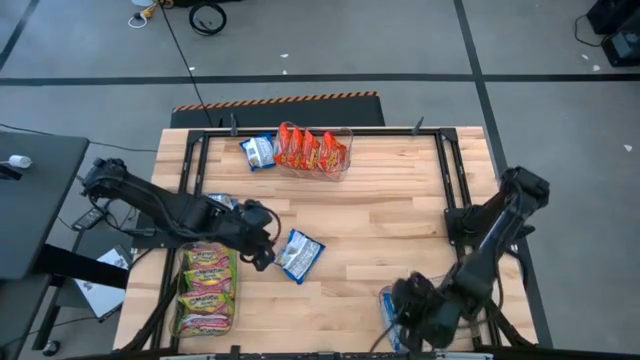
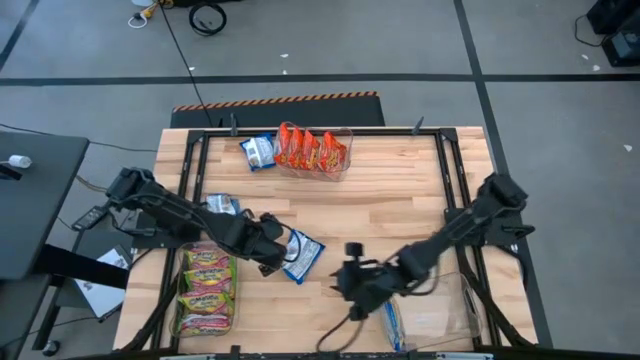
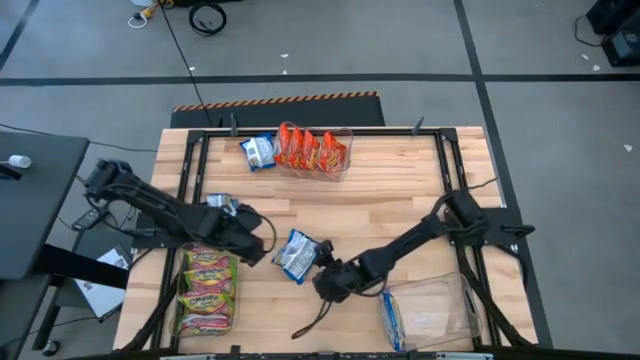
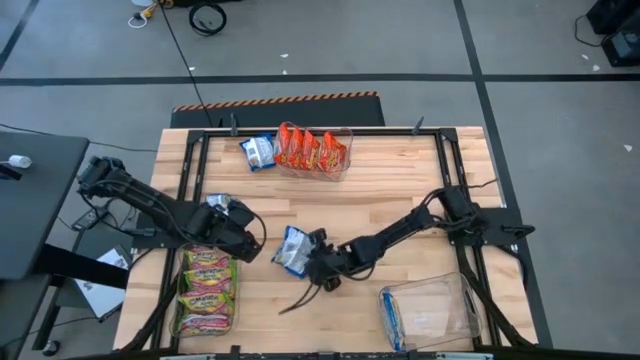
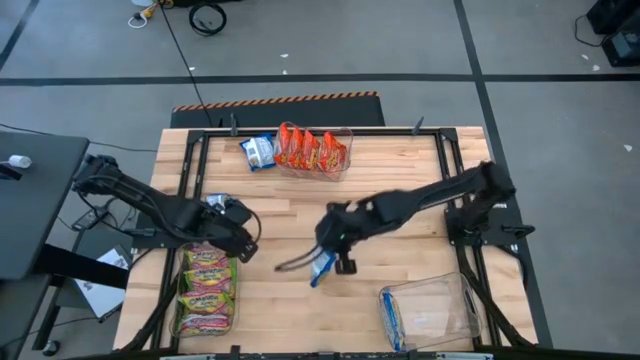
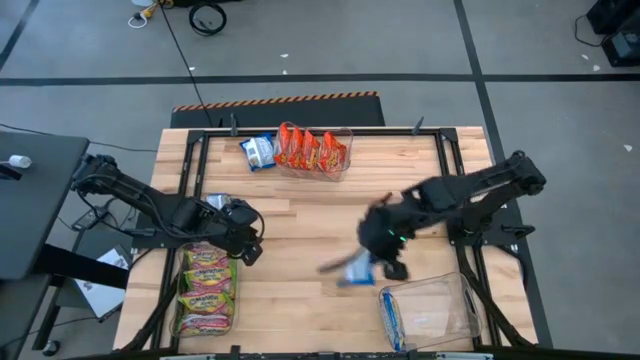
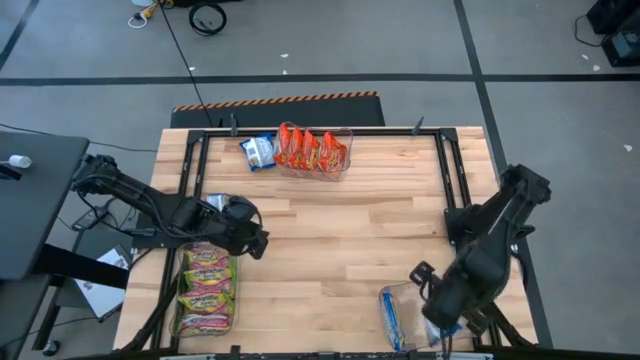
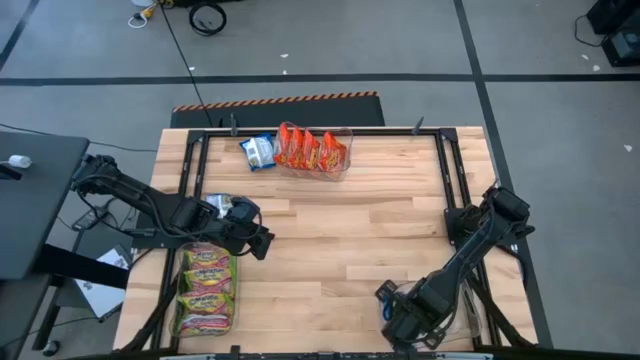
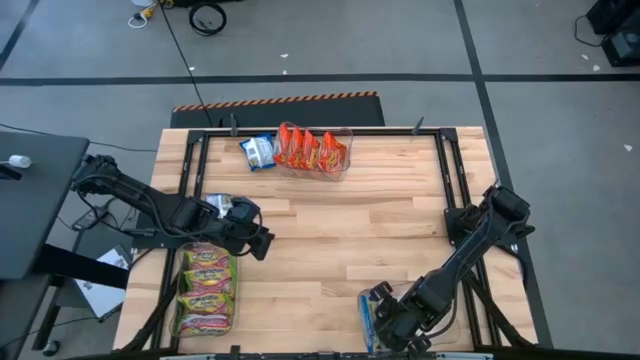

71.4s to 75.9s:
Task: Sort Maruchan noodles
Put the blue noodle pack into the bottom right transparent bin

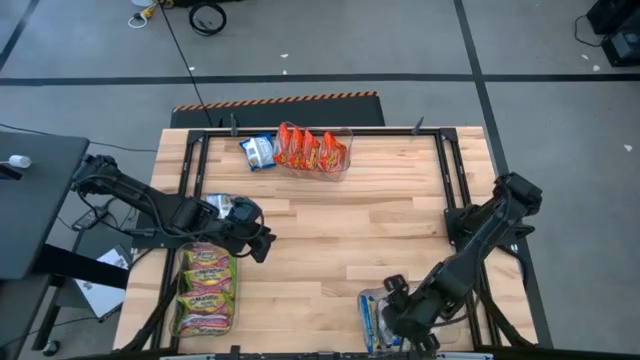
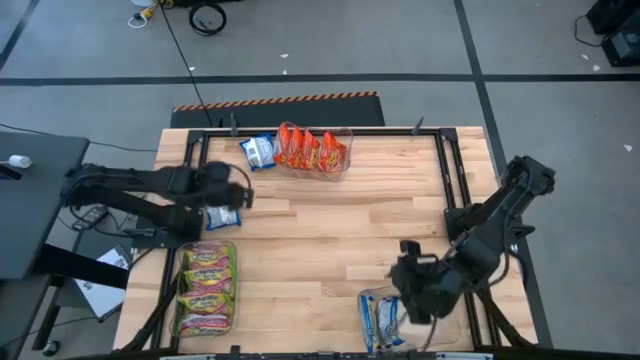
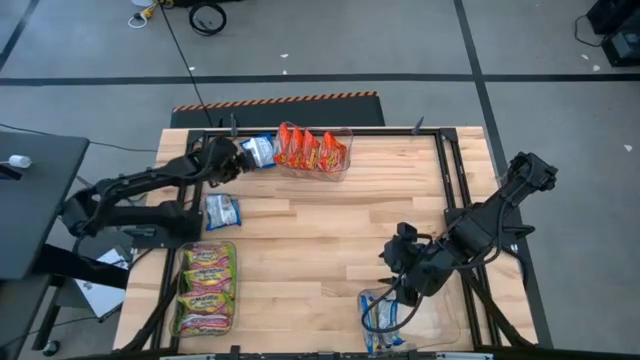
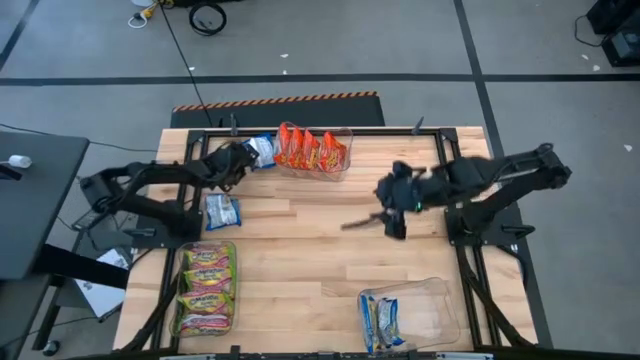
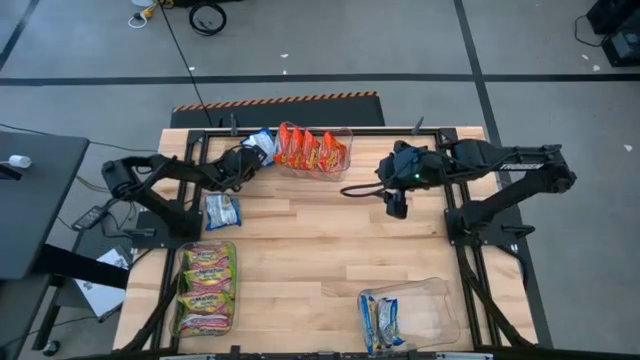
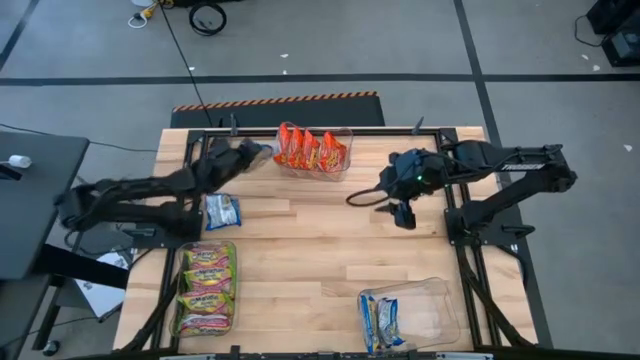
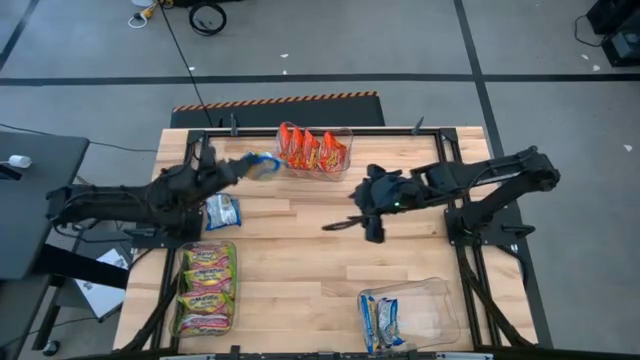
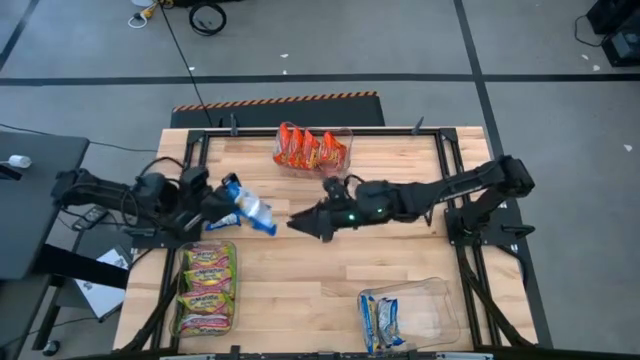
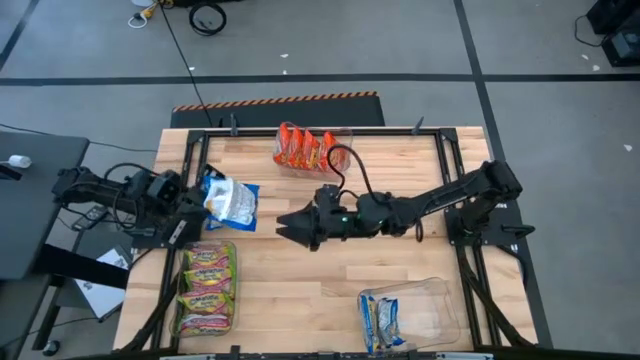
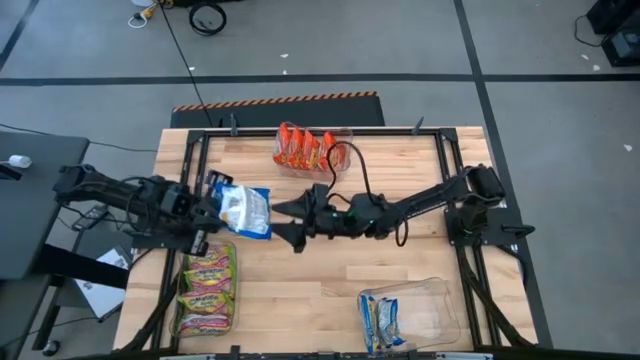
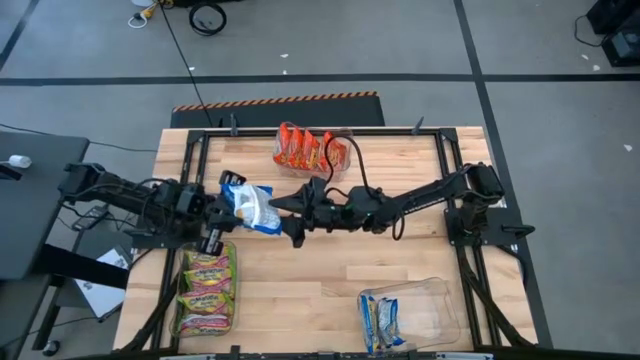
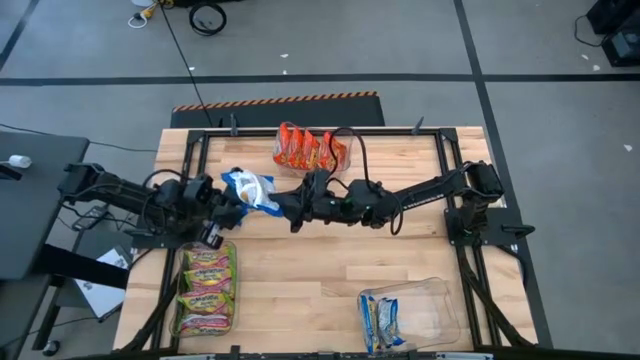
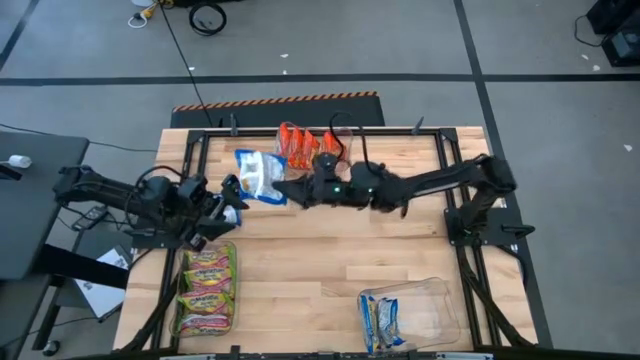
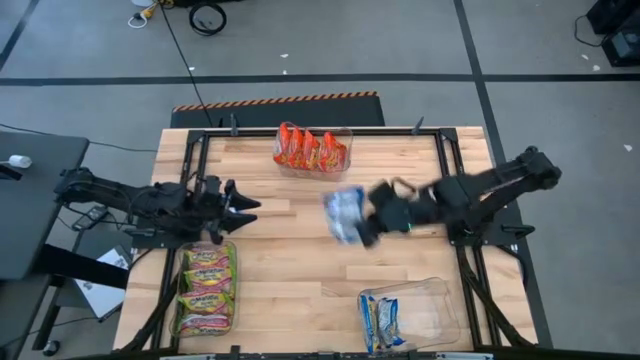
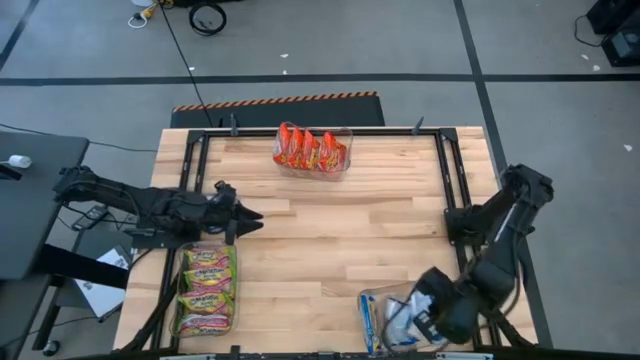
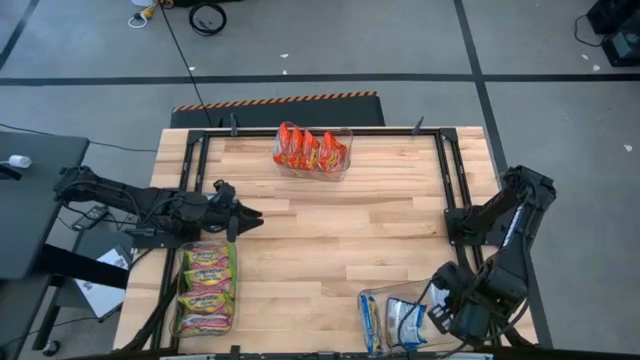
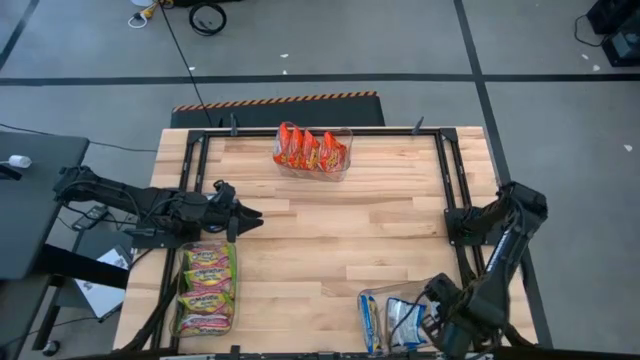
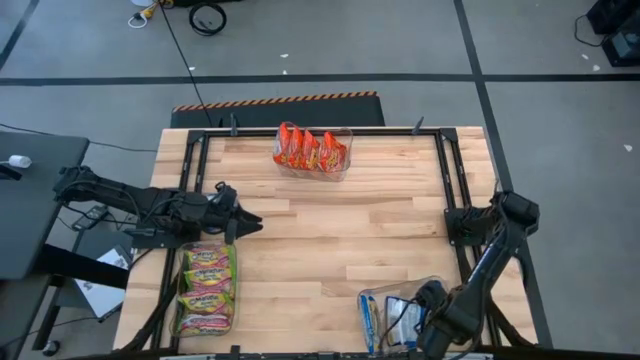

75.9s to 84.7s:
Put the blue noodle pack into the bottom right transparent bin

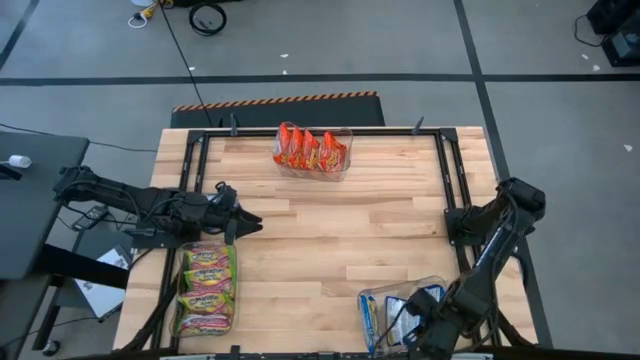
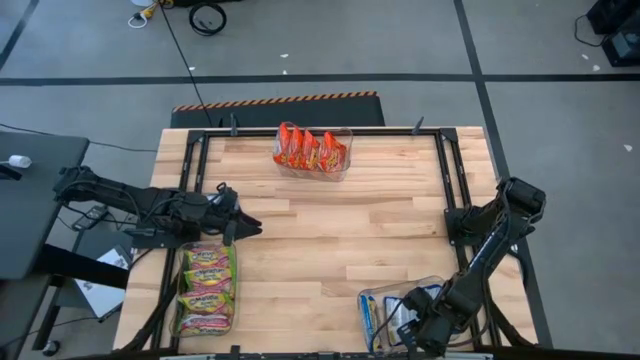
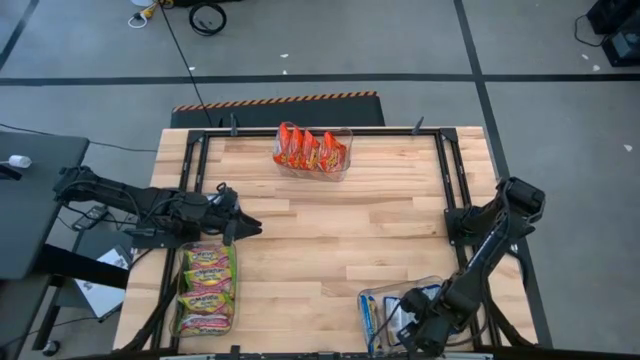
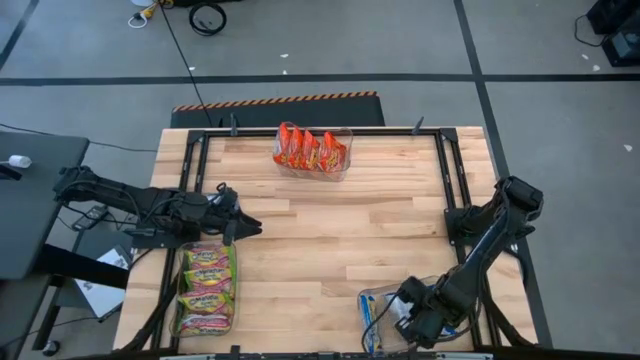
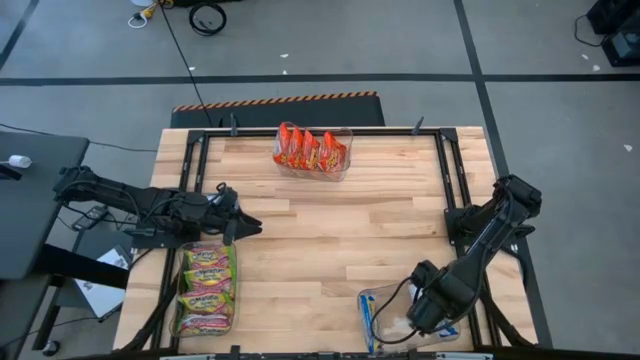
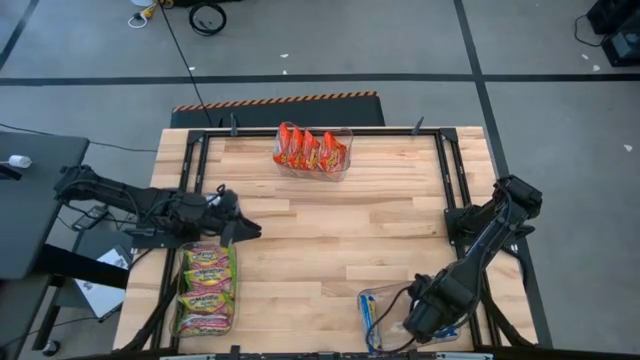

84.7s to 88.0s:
Adjust the blue noodle pack in the bottom right transparent bin

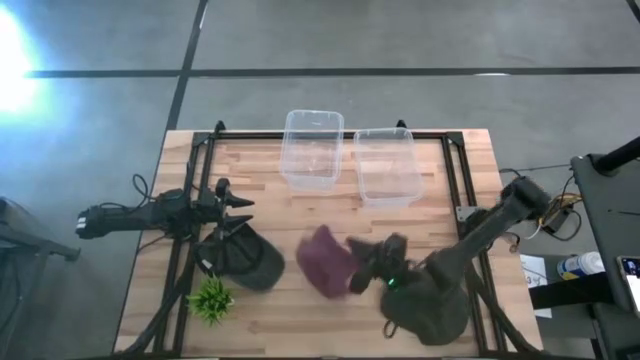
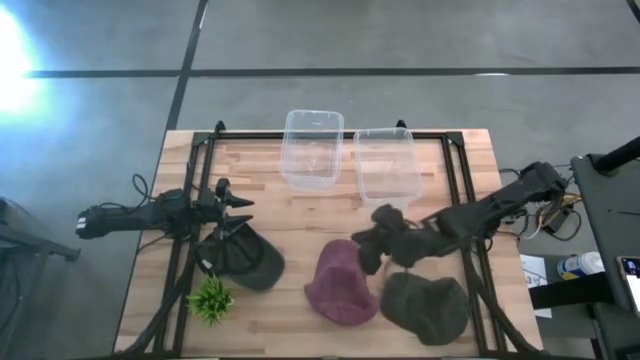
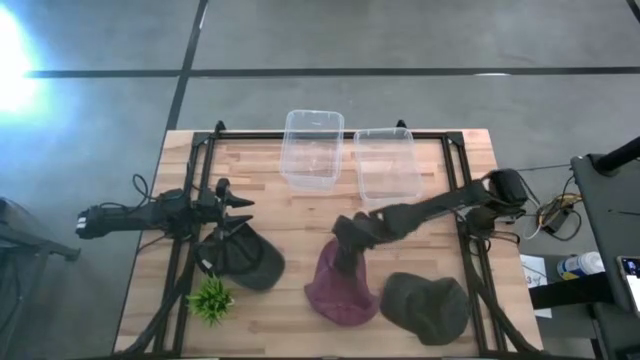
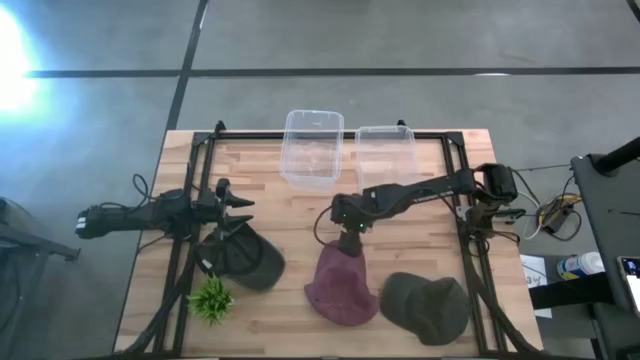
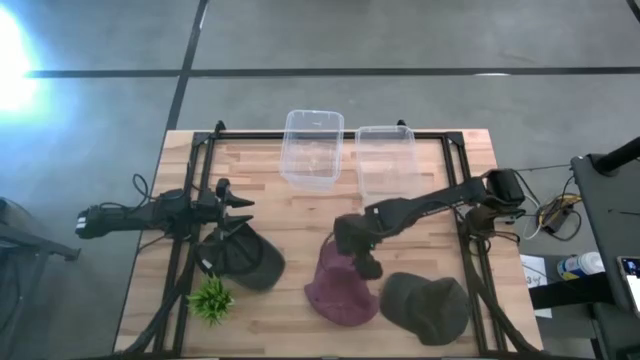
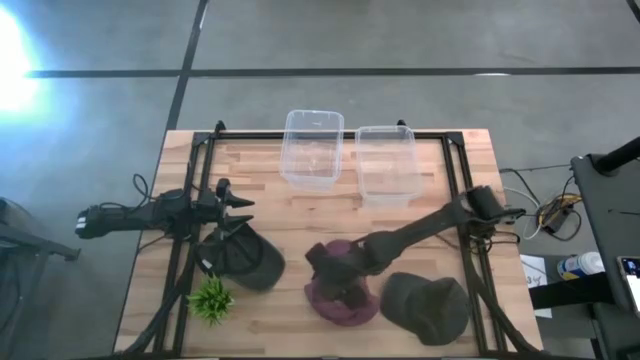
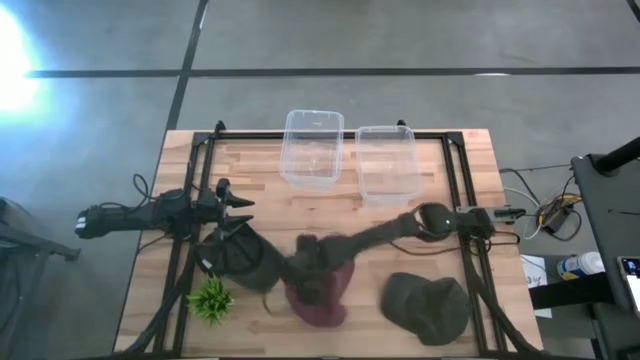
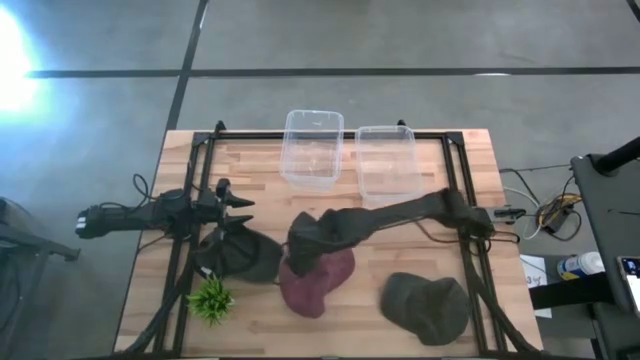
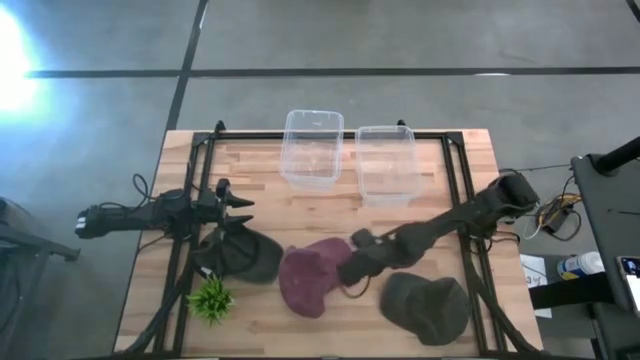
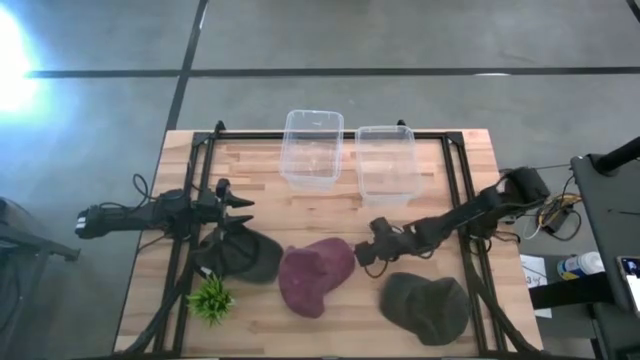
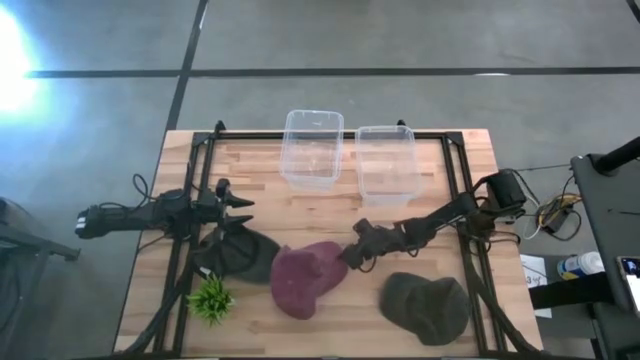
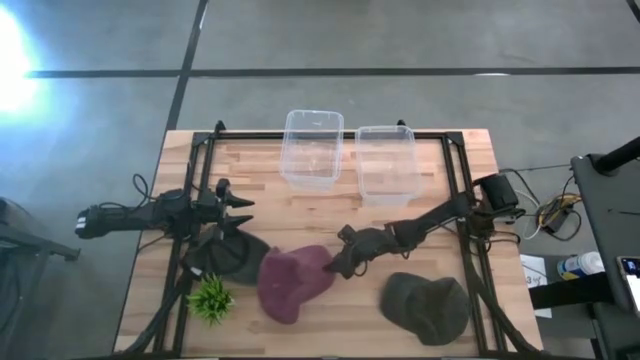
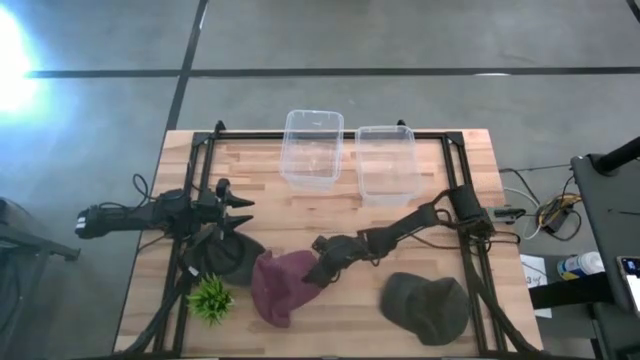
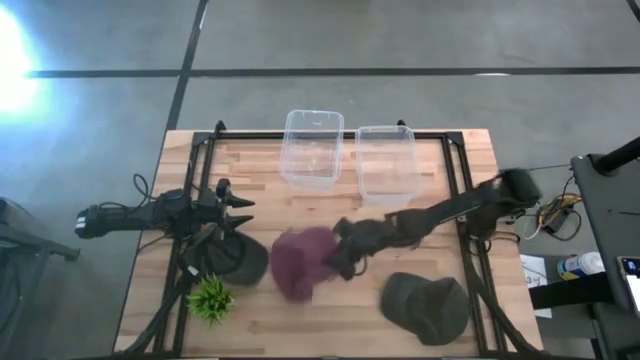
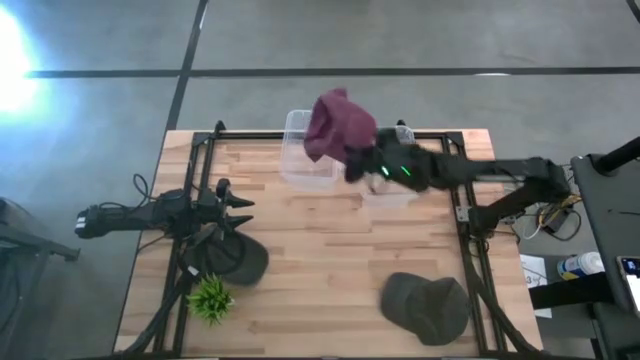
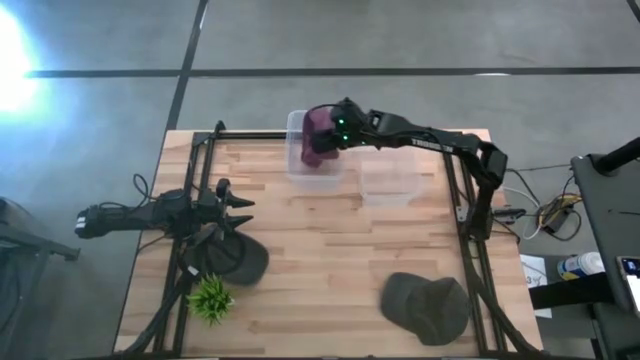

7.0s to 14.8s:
Task: Pick & Place hat
Put the red cap into the left transparent bin
